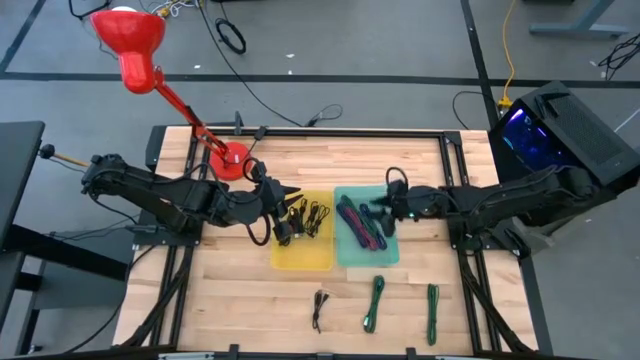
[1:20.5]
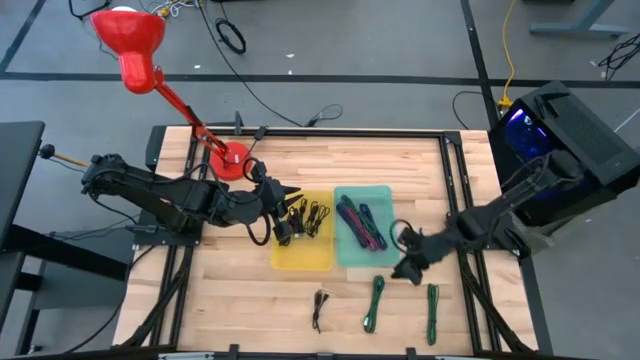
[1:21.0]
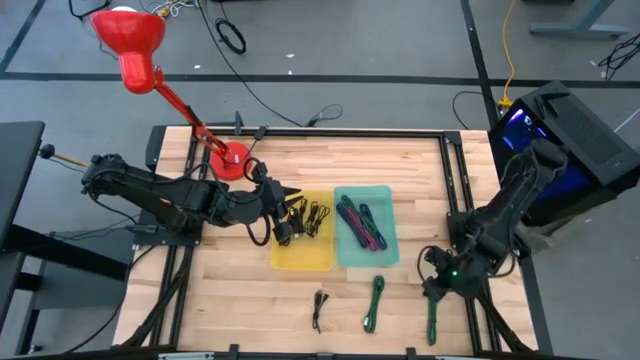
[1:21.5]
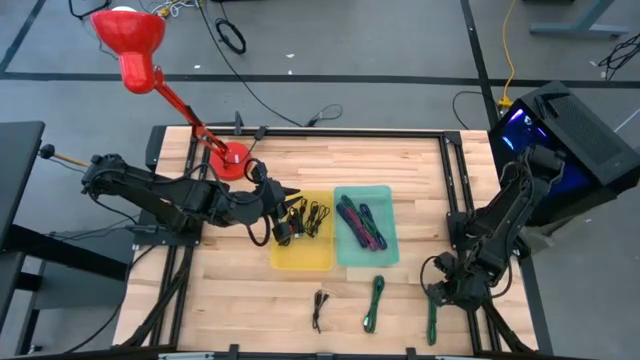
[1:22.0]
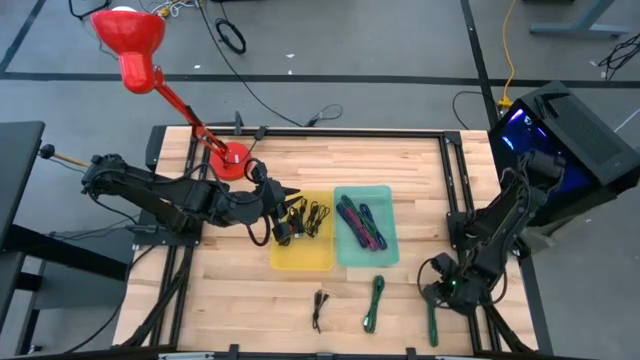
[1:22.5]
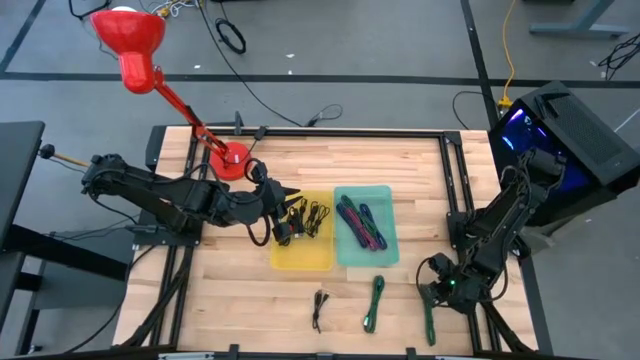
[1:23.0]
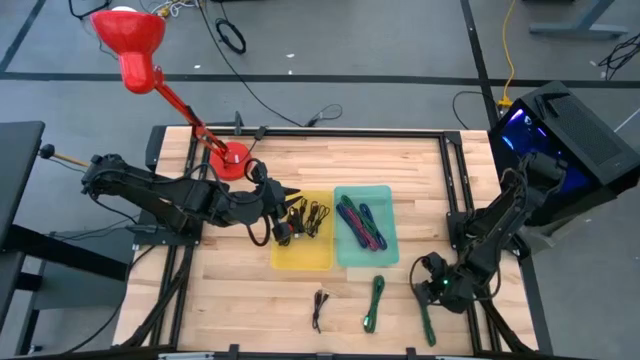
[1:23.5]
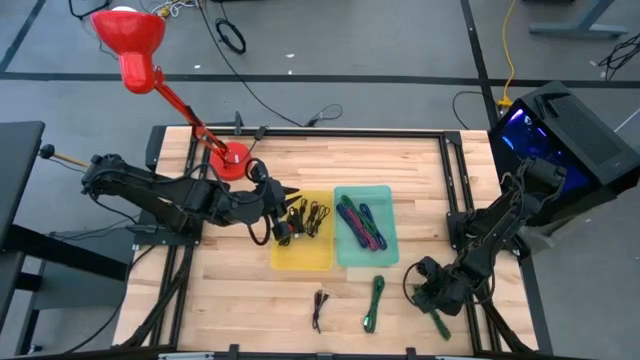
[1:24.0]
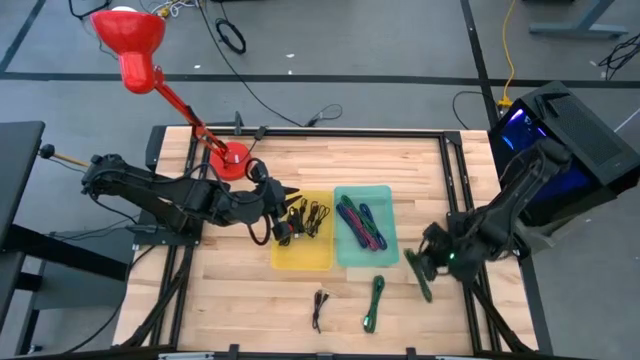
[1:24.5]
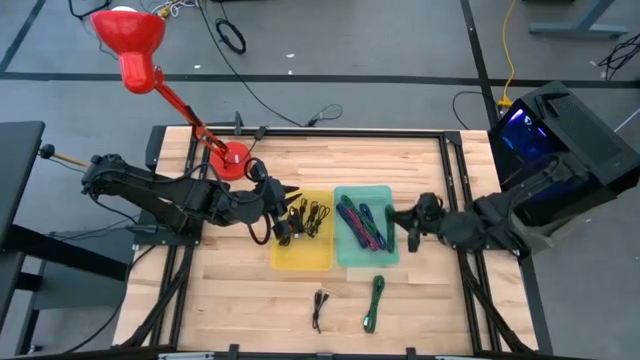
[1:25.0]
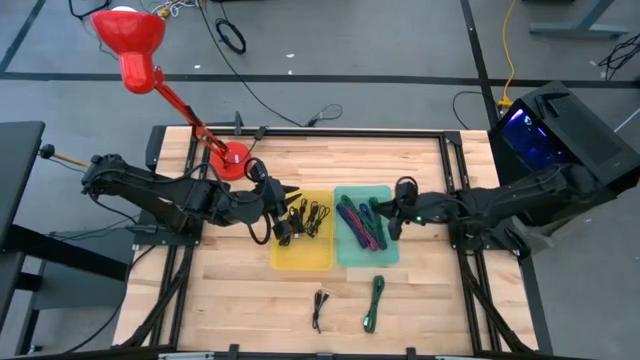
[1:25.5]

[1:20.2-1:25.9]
Task: Pick & Place USB Port
Put the right green charger cable into the green bin

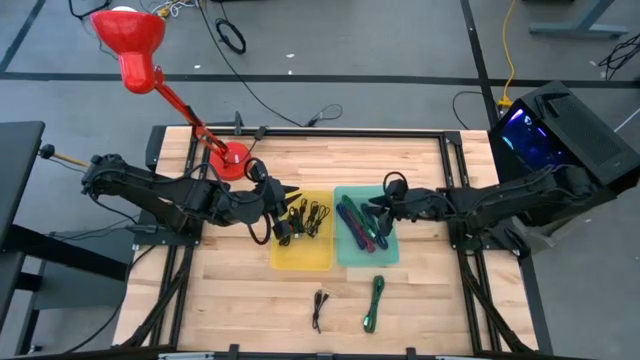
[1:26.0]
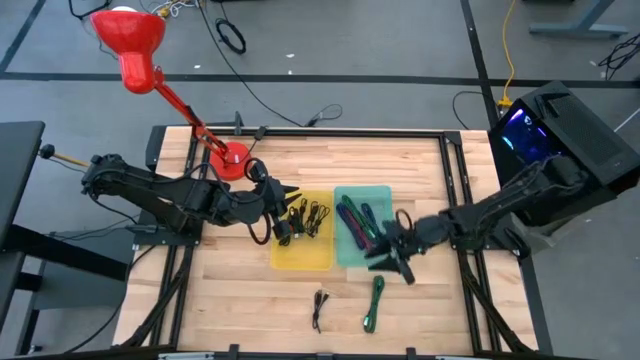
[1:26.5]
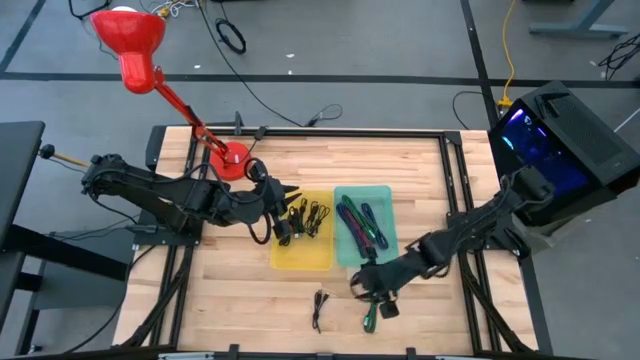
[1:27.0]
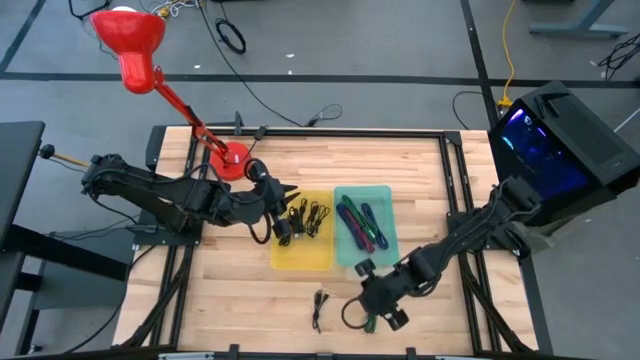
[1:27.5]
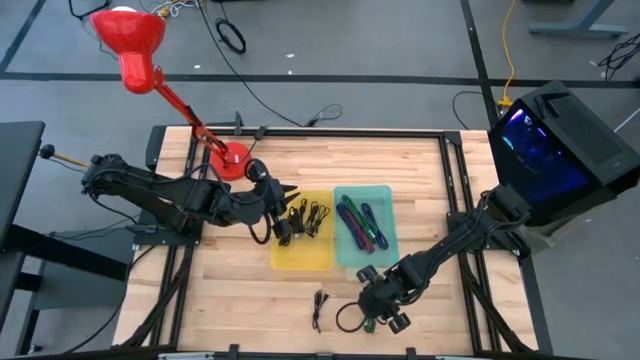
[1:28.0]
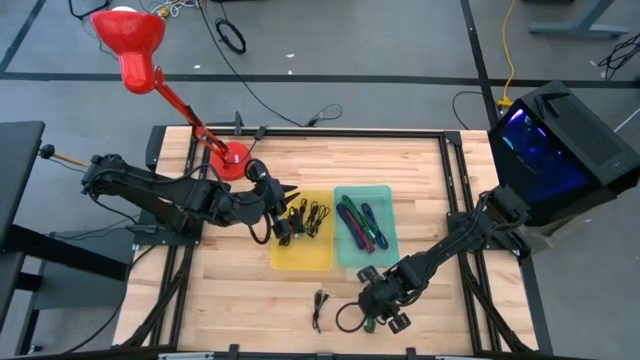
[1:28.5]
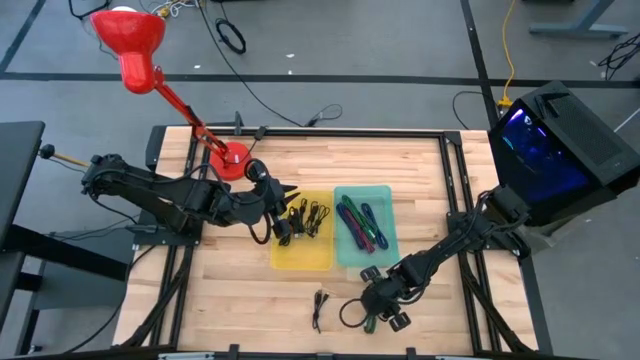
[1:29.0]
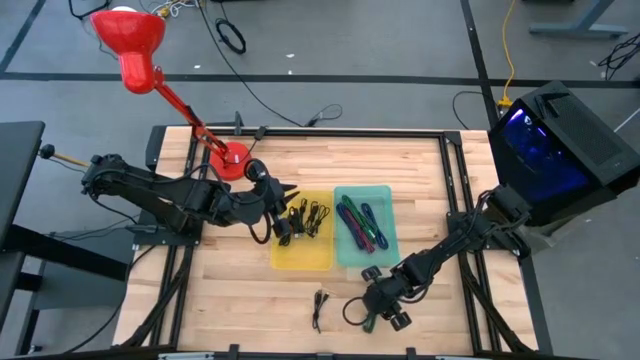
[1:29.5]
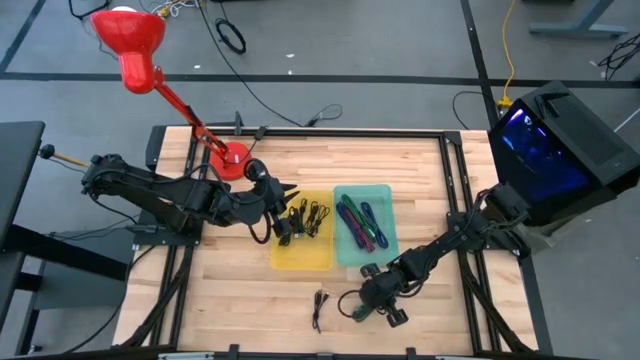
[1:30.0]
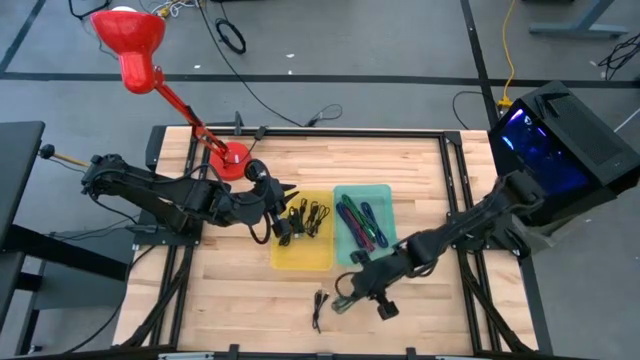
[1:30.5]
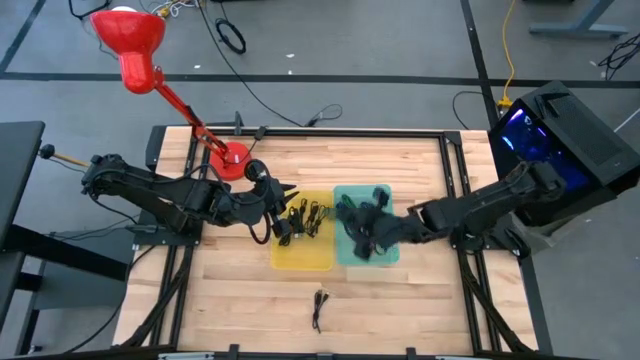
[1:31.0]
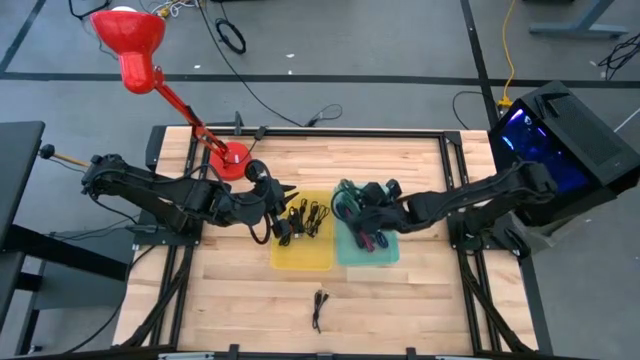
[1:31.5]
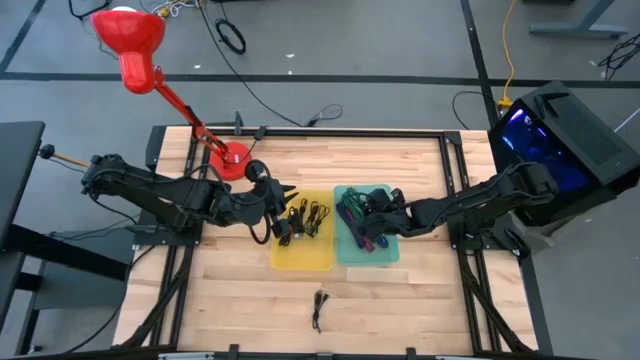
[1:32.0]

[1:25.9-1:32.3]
Put the green charger cable into the green bin

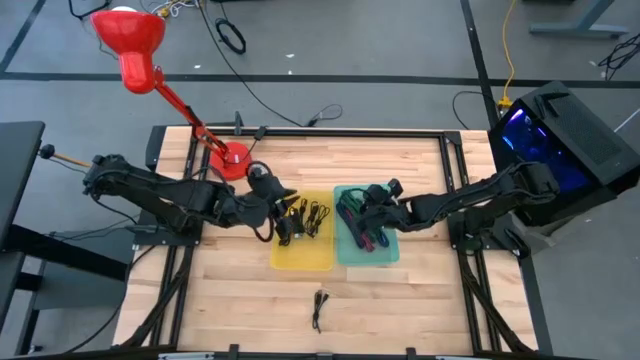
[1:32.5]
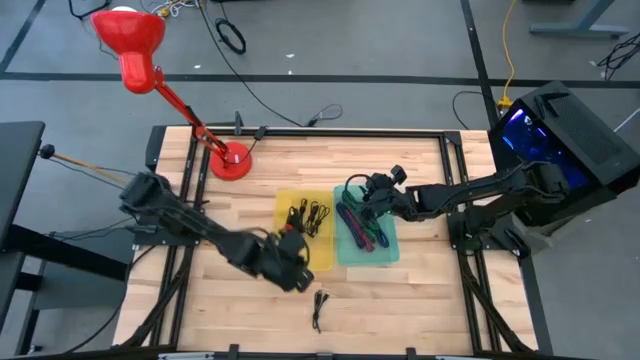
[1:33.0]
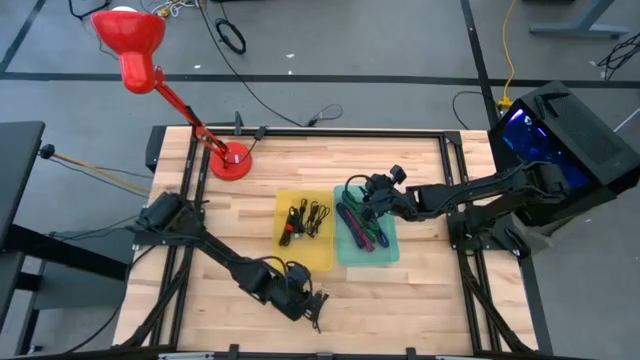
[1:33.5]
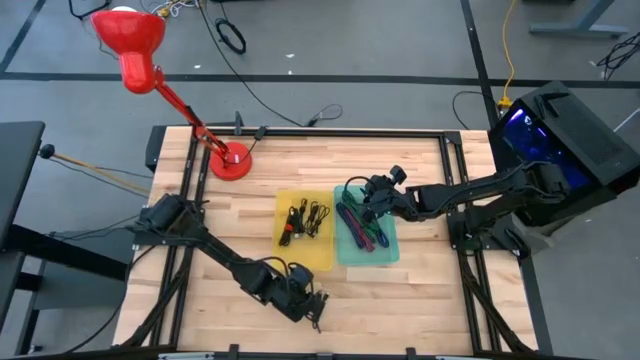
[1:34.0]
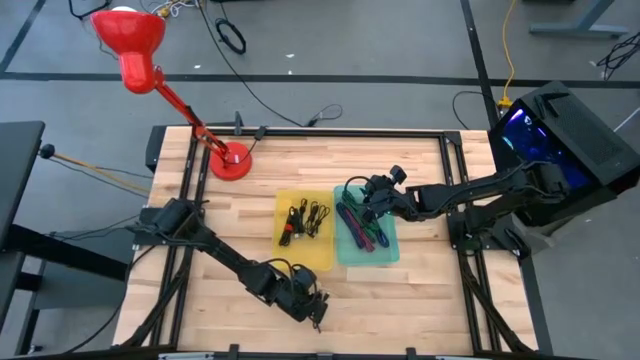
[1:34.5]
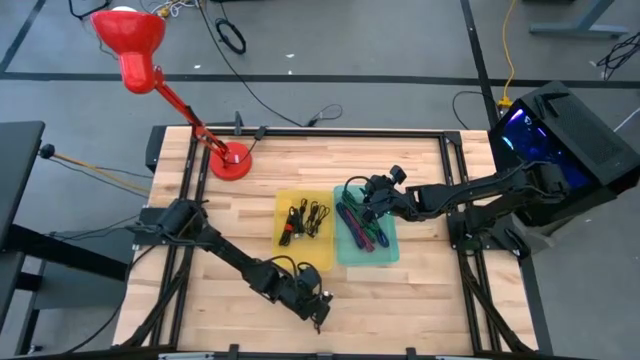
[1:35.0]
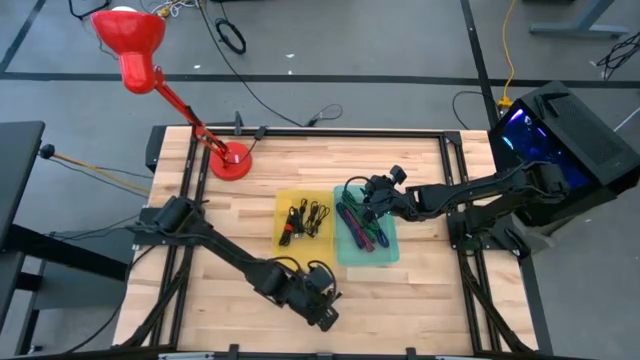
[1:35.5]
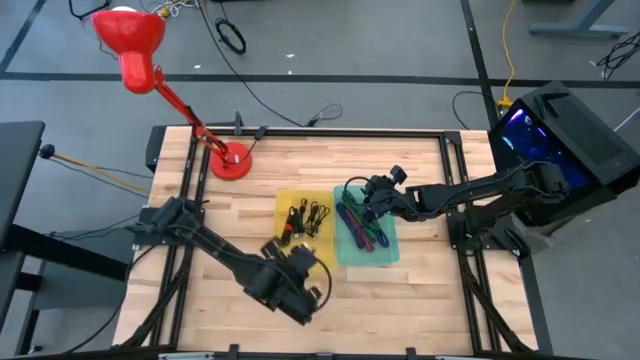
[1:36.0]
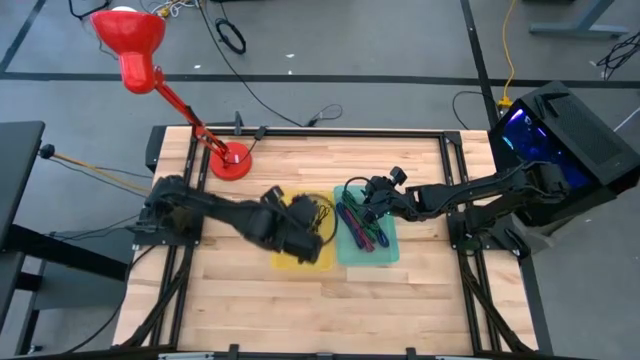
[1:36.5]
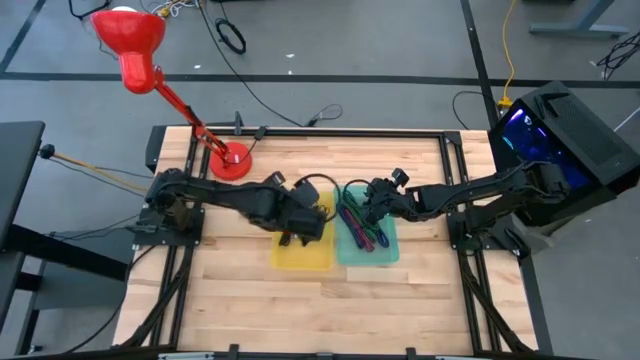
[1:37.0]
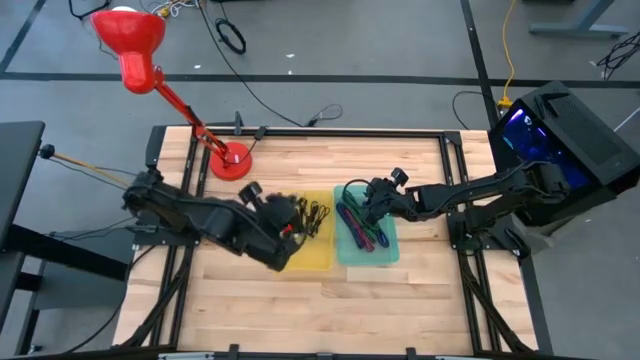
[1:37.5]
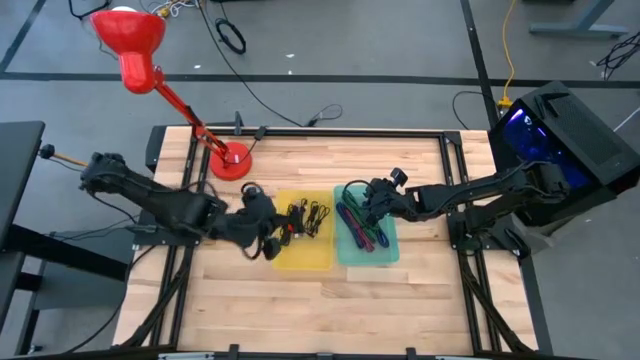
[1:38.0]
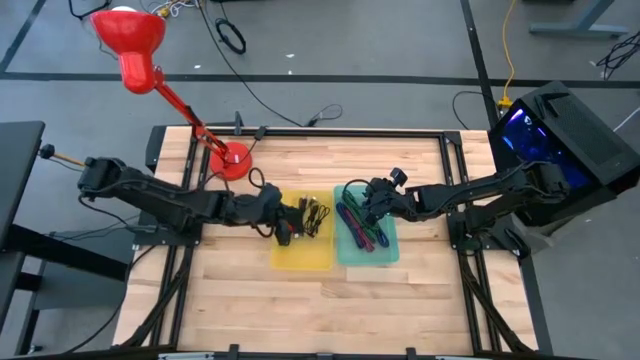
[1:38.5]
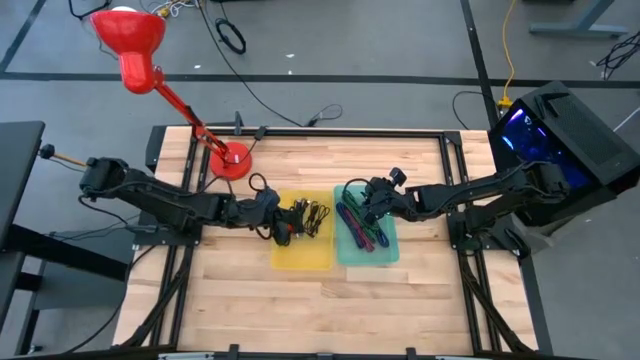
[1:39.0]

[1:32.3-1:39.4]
Put the black charger cable into the yellow bin
